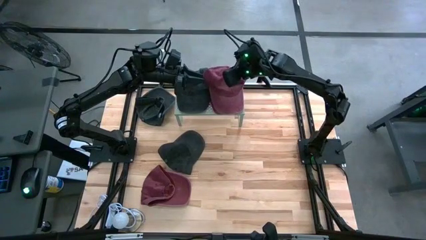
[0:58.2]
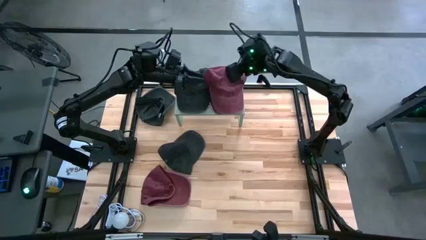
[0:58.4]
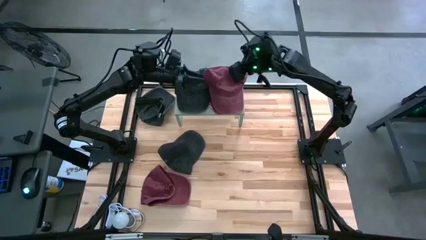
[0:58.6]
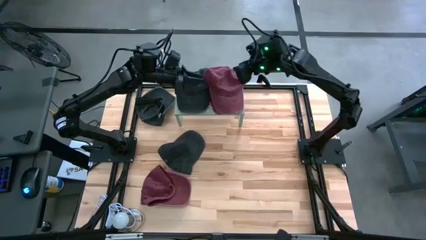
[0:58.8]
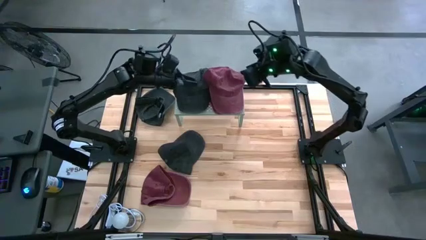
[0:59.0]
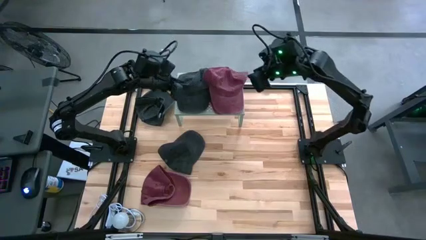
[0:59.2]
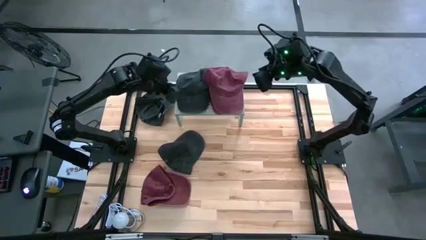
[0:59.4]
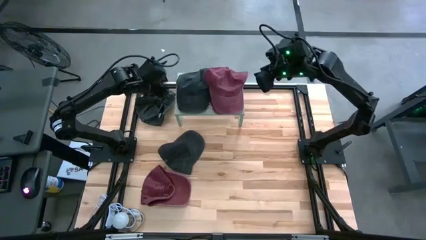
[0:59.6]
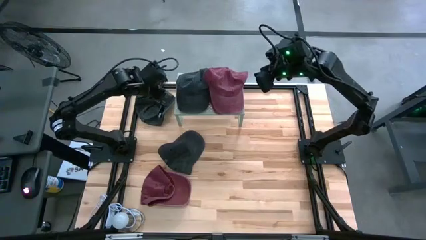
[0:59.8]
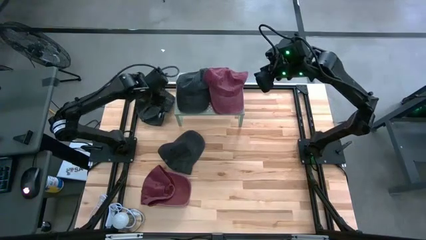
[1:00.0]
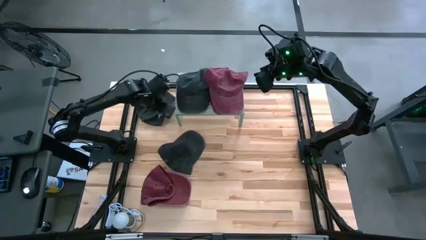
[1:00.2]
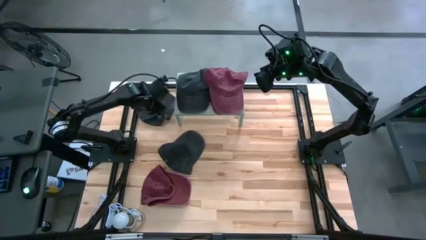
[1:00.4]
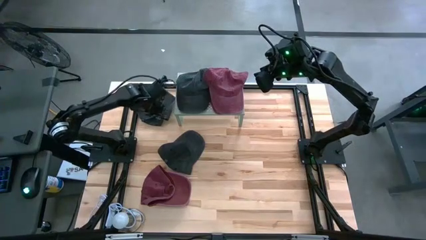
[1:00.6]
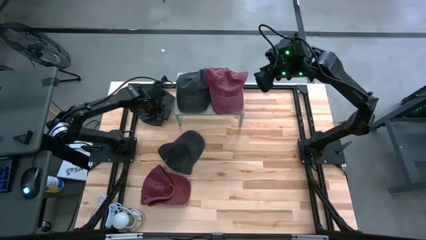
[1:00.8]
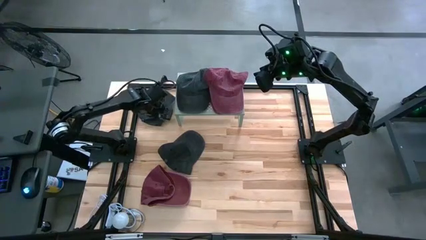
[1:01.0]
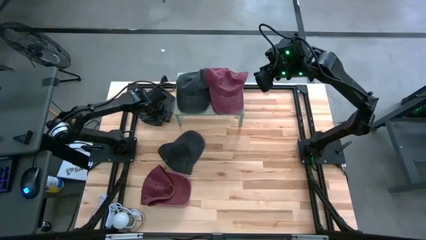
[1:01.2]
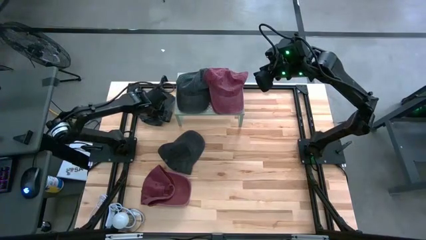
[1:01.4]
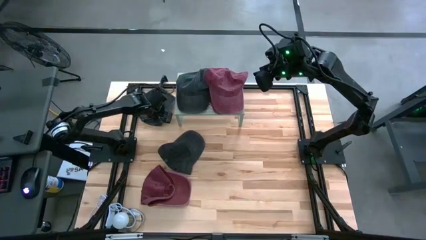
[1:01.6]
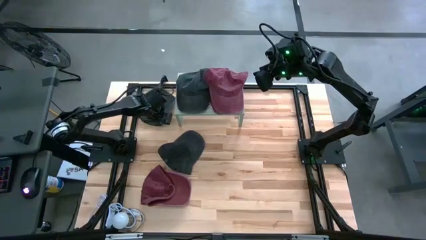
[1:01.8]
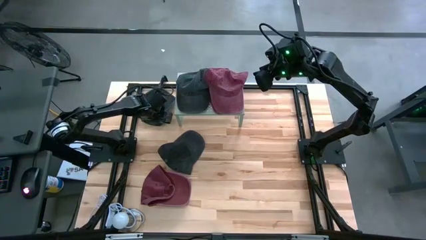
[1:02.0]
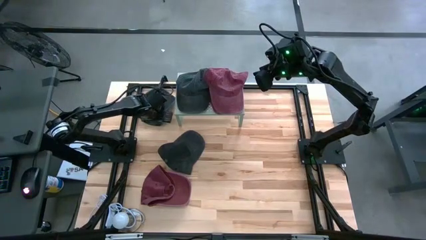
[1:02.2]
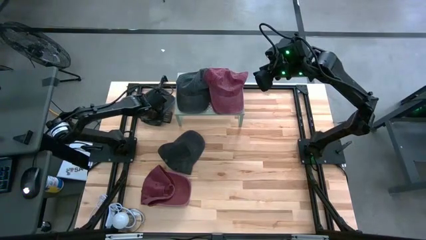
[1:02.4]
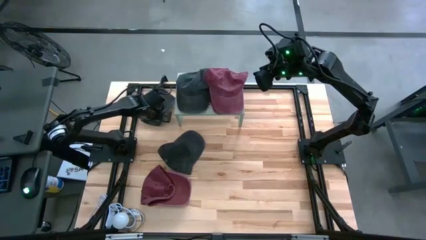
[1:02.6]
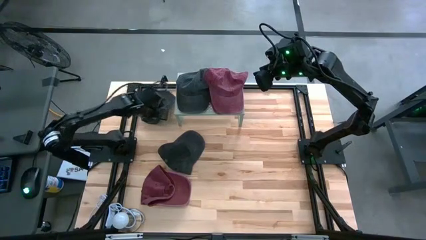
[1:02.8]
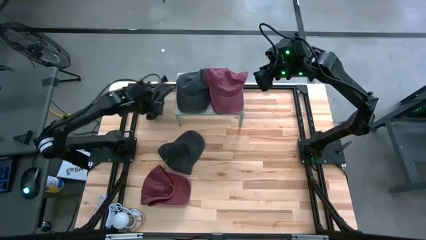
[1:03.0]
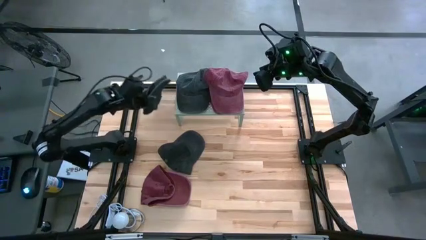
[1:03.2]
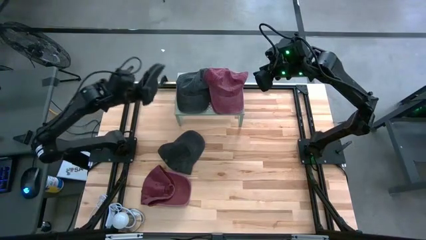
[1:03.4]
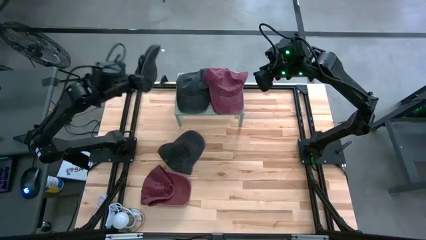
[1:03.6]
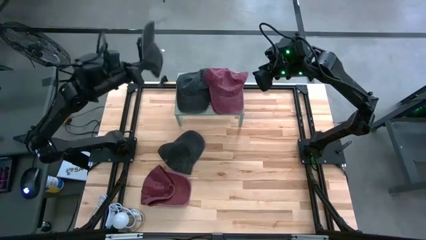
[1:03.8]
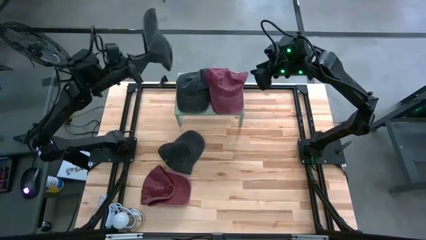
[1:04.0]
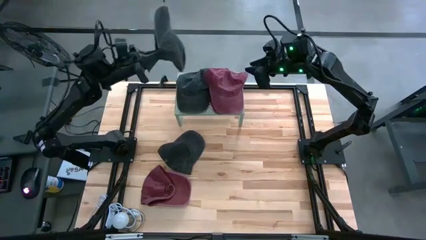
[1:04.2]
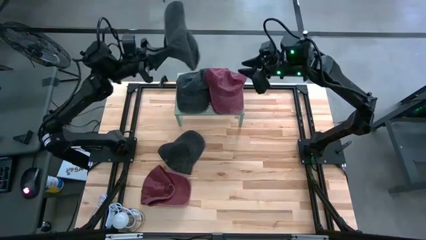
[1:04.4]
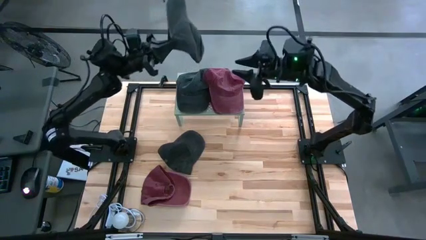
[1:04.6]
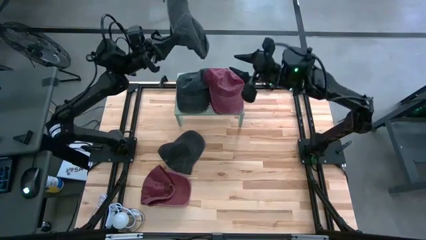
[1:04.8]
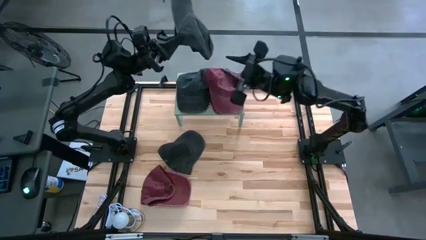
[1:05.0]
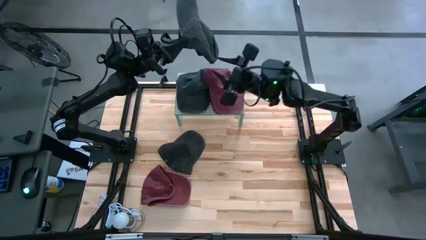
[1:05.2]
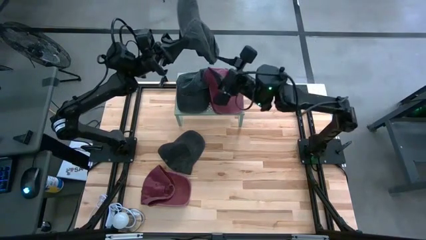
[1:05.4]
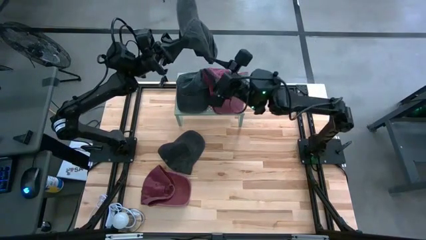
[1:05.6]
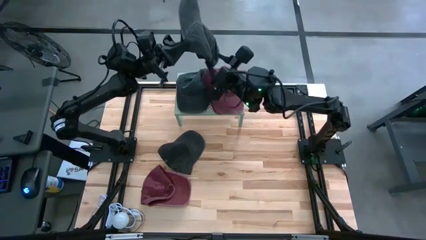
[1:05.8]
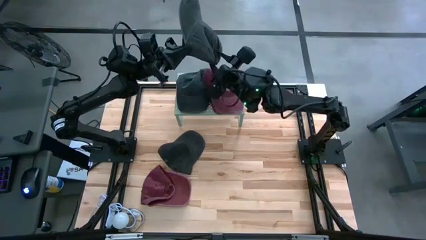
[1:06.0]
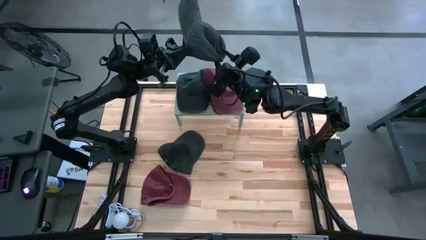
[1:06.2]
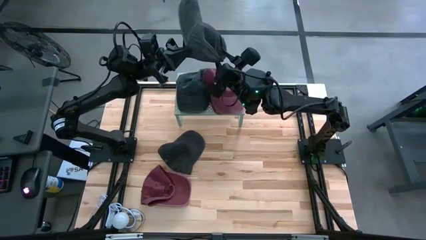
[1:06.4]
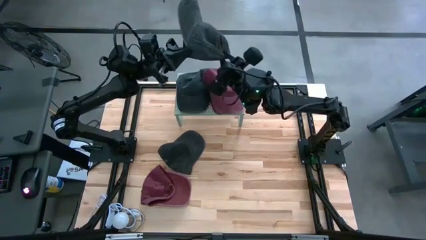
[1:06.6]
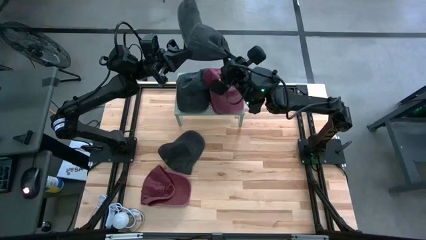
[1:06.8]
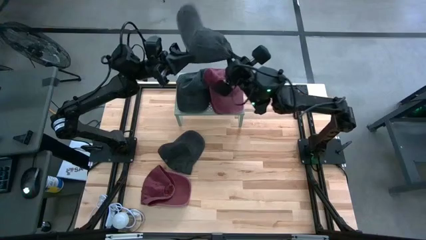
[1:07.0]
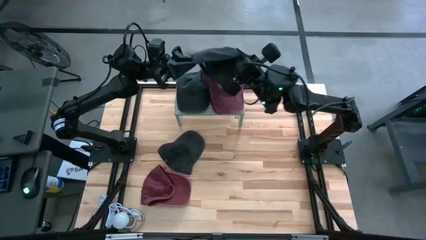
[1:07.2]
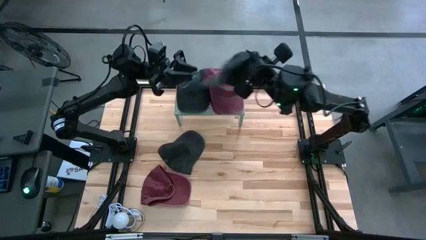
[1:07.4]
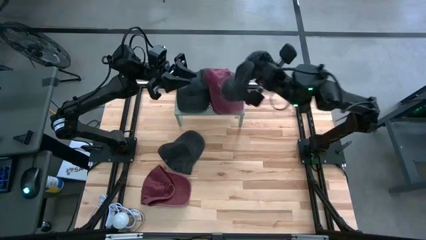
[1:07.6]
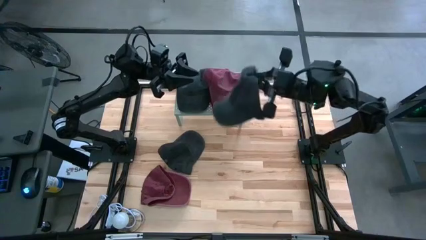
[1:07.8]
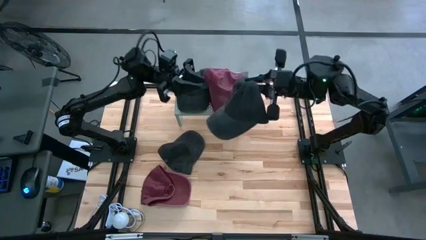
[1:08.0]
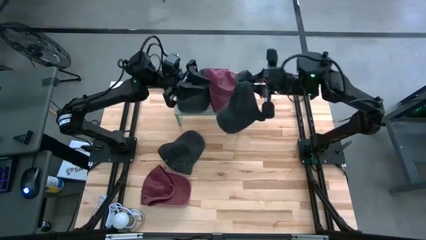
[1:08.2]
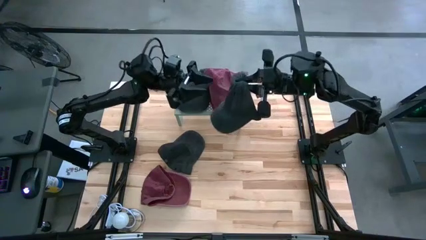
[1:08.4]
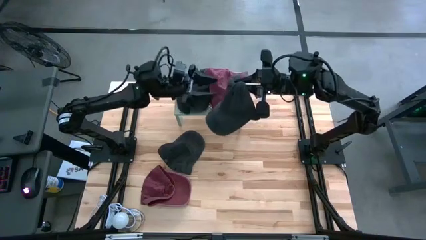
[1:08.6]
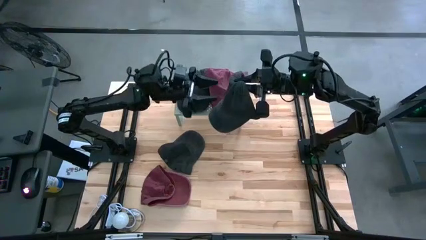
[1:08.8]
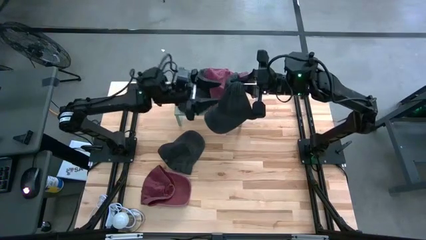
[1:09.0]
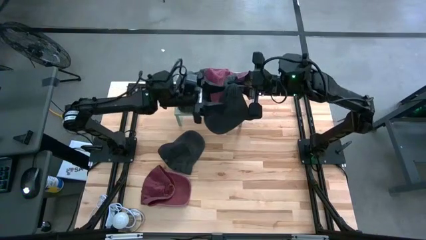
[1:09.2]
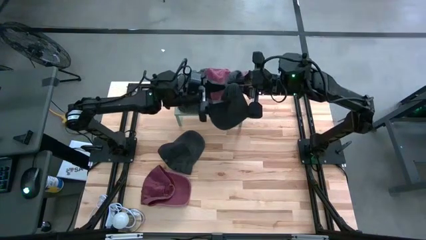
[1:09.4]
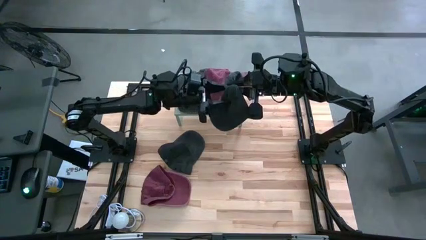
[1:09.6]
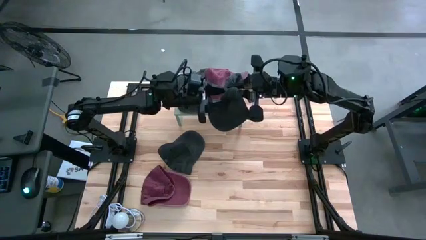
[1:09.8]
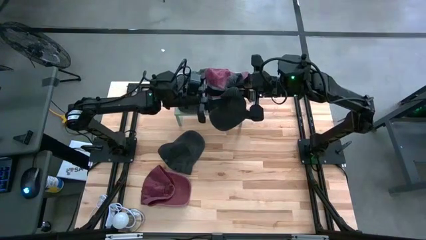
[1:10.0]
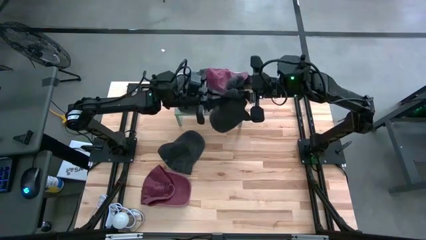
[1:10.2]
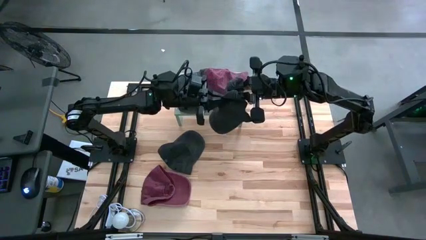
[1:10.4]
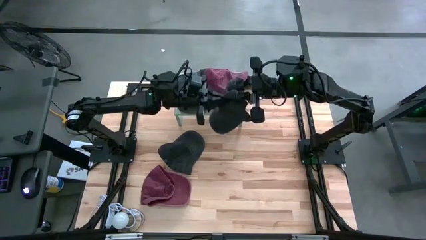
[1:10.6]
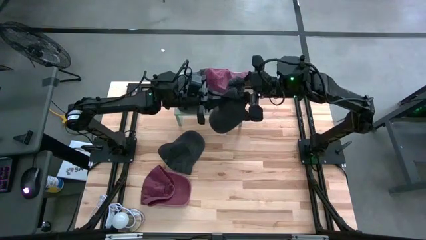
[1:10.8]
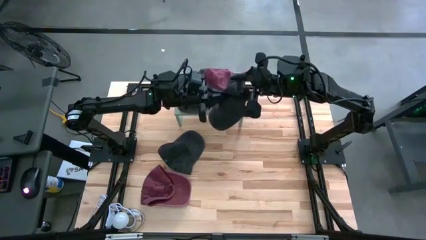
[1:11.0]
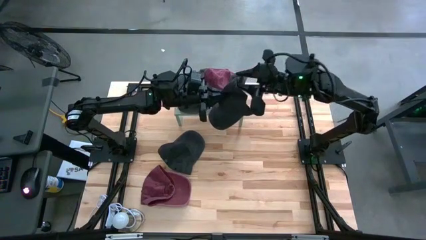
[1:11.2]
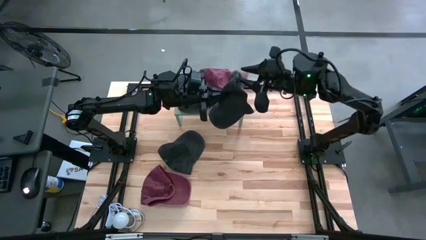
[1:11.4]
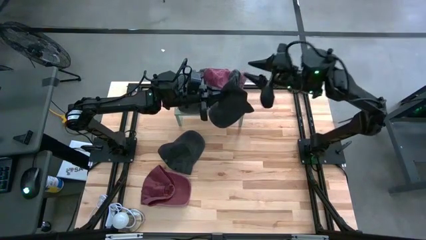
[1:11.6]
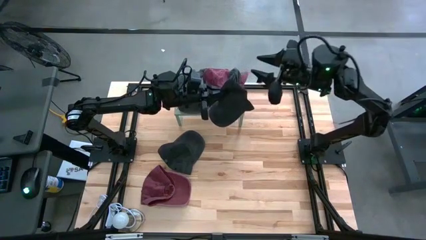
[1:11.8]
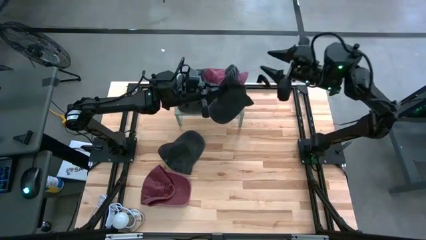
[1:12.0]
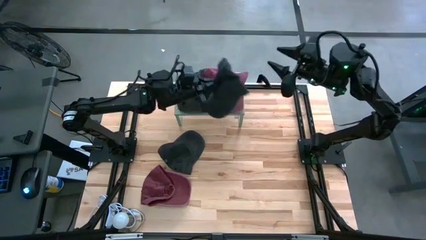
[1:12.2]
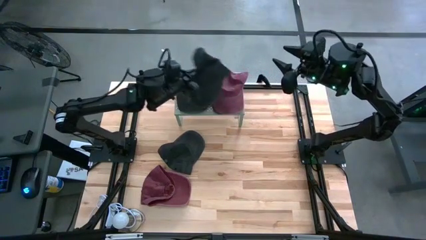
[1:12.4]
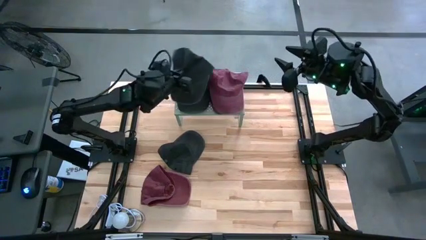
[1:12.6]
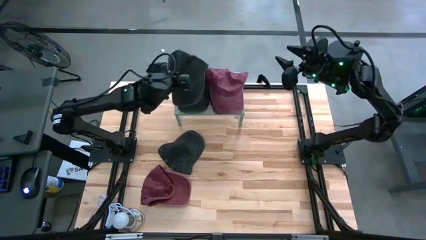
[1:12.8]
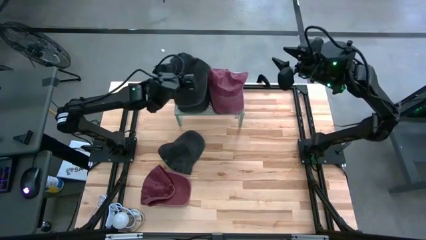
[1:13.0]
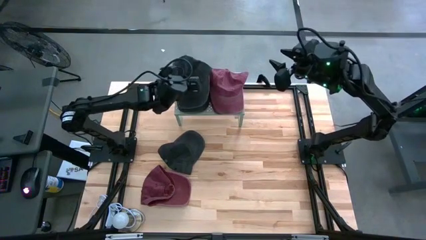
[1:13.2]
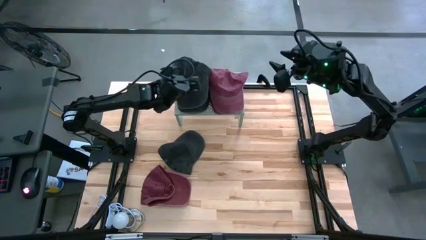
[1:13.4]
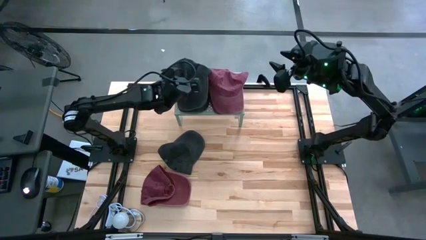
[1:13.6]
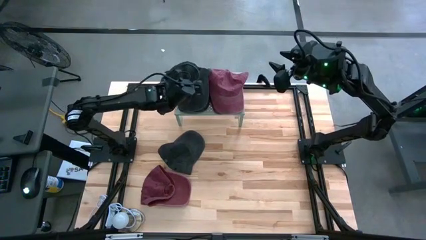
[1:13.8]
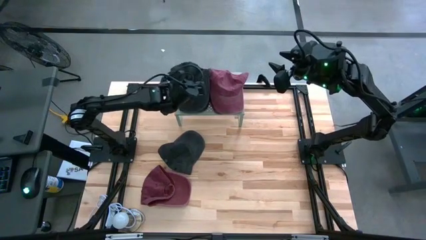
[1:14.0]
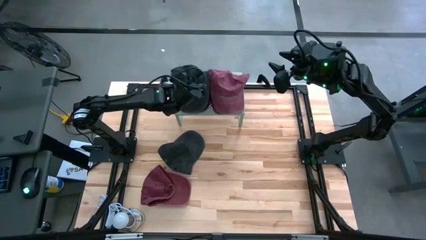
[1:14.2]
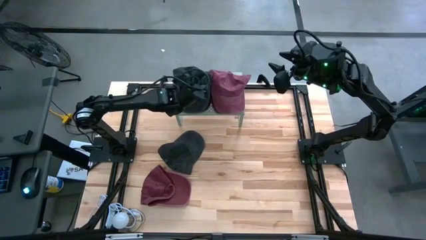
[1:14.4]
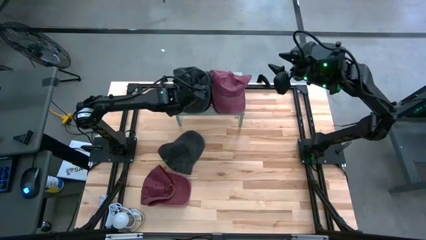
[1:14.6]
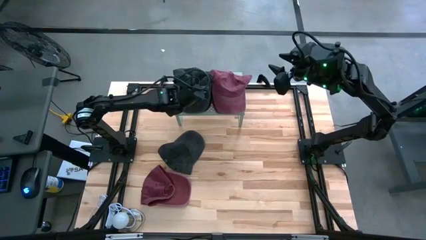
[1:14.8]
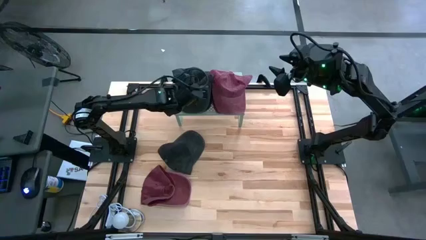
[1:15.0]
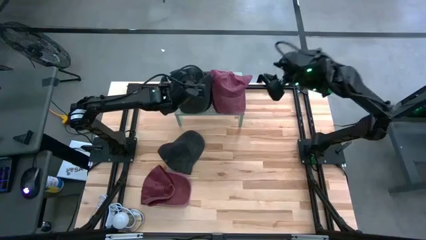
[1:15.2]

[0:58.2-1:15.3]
Task: Pick & Place hat
Stack the left black cap on the red cap on the shelf
